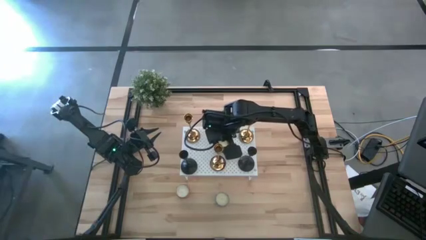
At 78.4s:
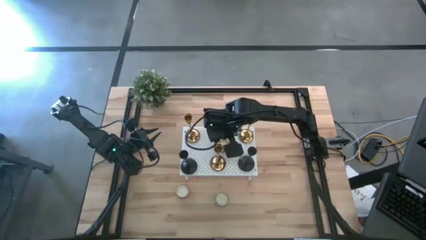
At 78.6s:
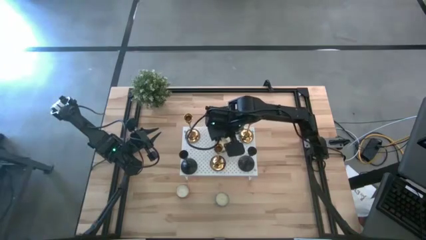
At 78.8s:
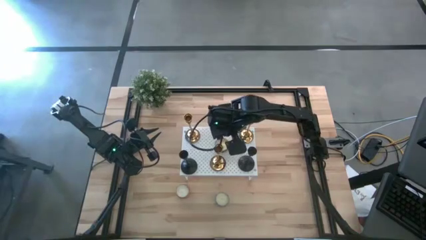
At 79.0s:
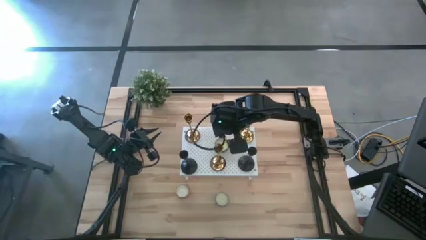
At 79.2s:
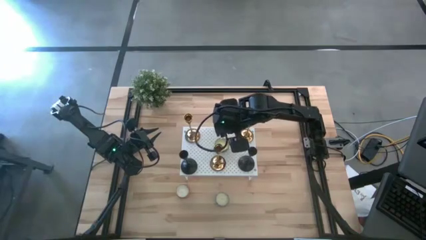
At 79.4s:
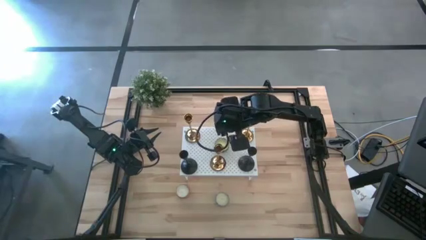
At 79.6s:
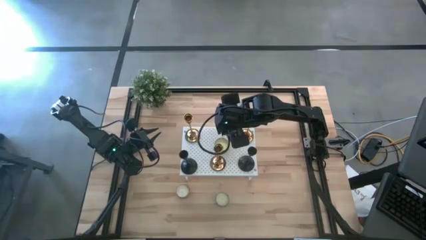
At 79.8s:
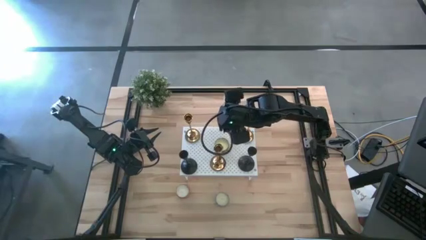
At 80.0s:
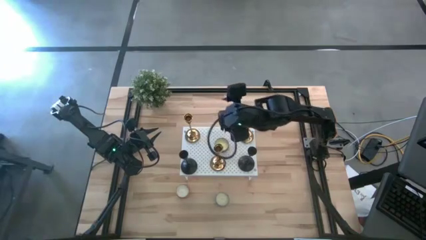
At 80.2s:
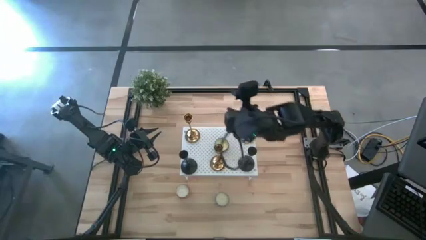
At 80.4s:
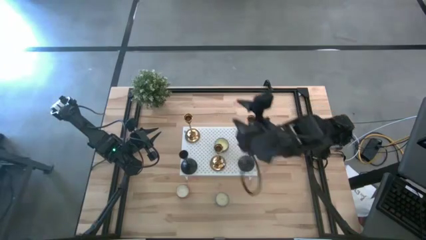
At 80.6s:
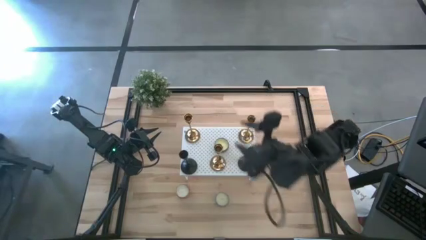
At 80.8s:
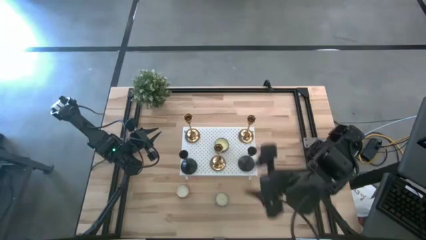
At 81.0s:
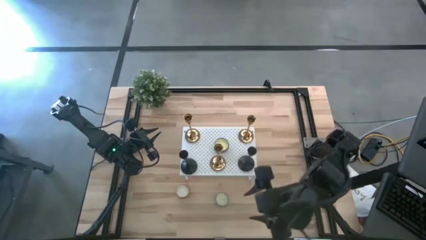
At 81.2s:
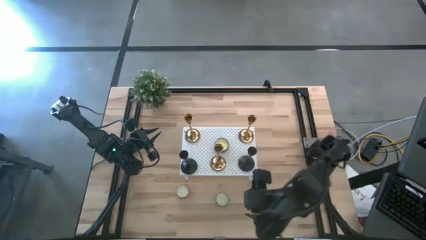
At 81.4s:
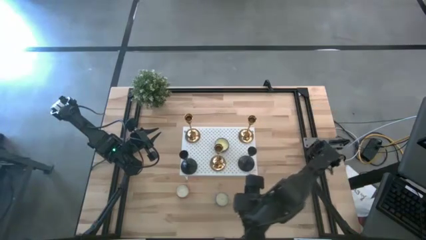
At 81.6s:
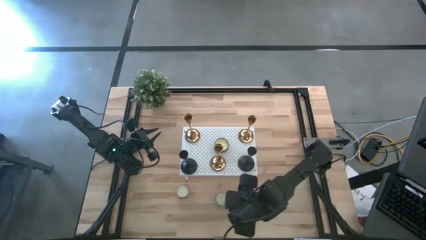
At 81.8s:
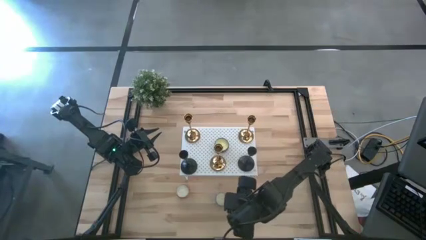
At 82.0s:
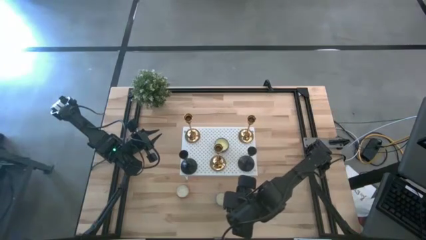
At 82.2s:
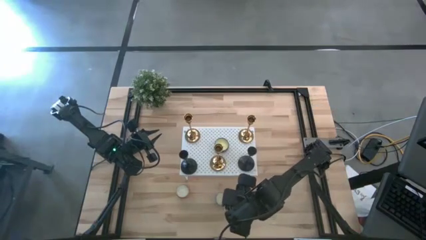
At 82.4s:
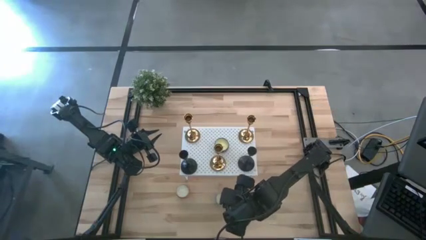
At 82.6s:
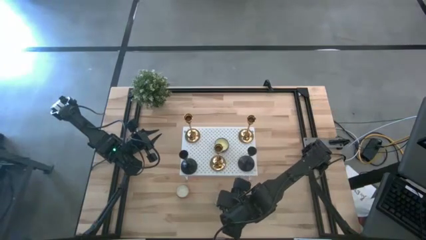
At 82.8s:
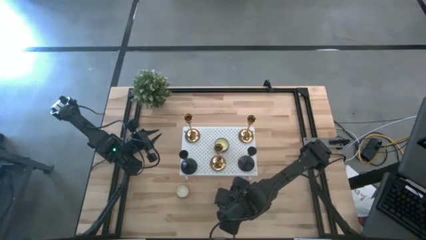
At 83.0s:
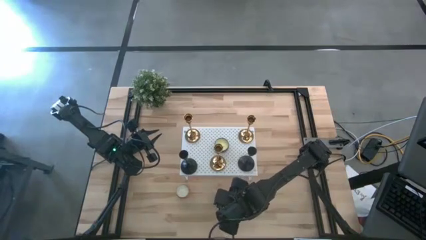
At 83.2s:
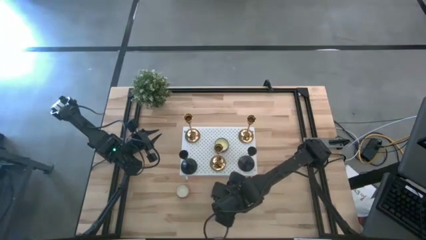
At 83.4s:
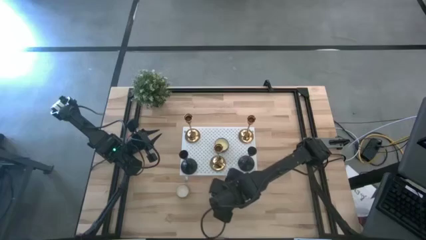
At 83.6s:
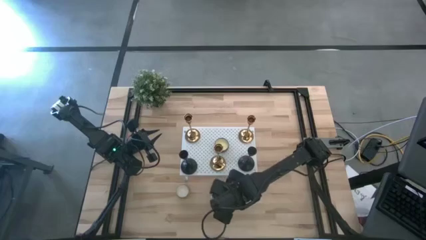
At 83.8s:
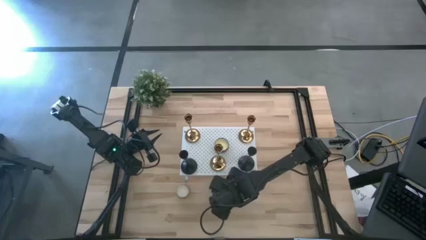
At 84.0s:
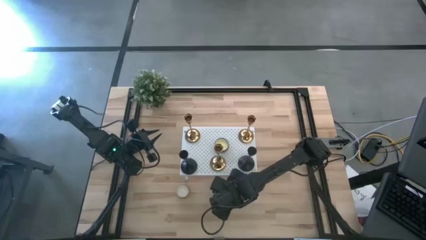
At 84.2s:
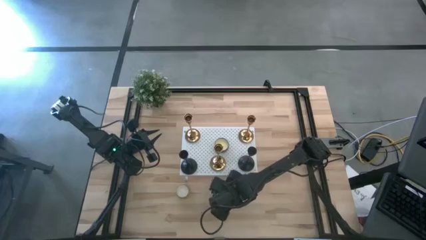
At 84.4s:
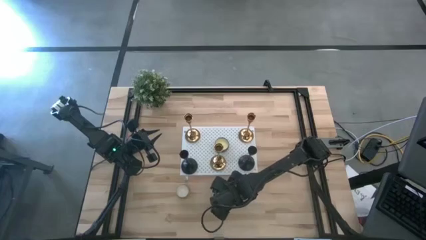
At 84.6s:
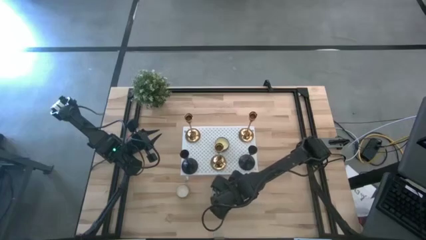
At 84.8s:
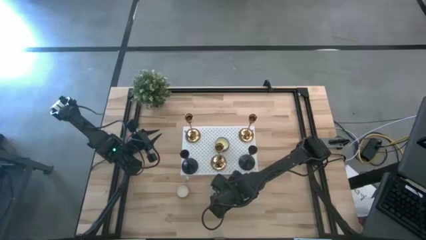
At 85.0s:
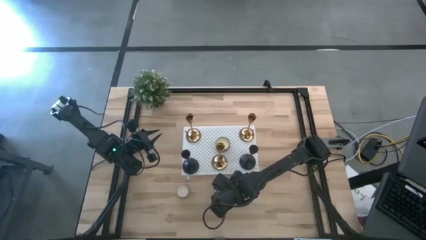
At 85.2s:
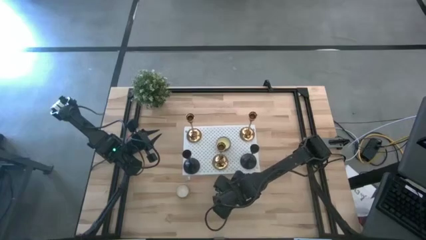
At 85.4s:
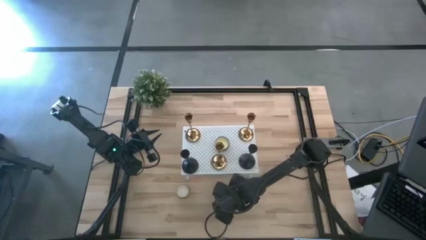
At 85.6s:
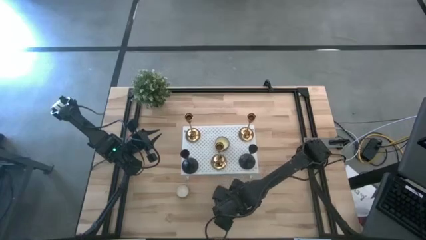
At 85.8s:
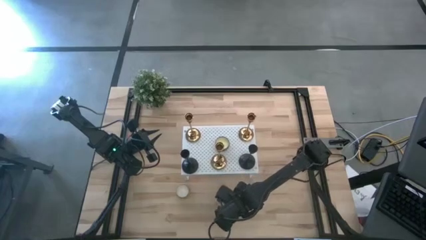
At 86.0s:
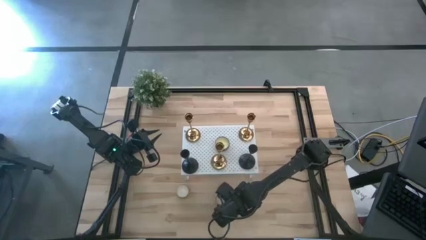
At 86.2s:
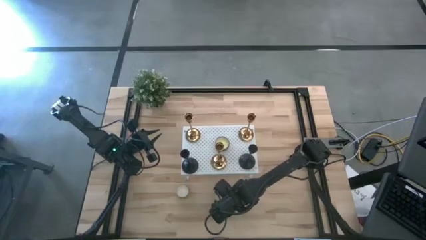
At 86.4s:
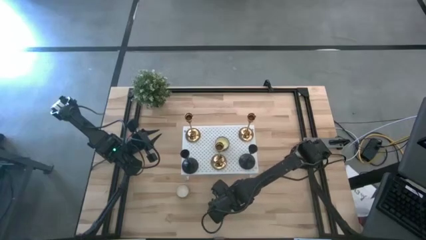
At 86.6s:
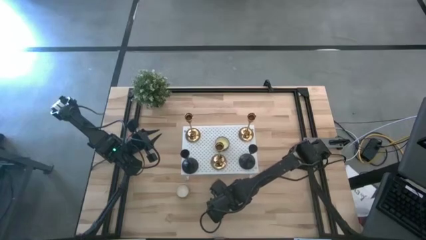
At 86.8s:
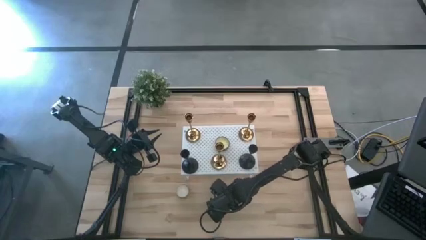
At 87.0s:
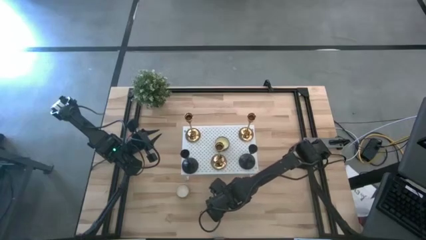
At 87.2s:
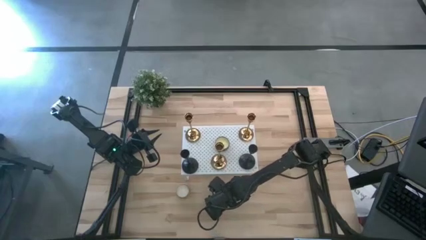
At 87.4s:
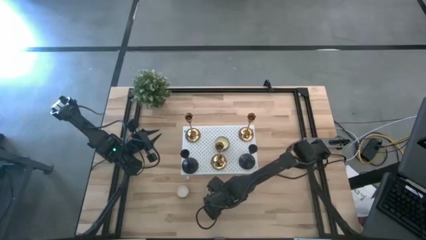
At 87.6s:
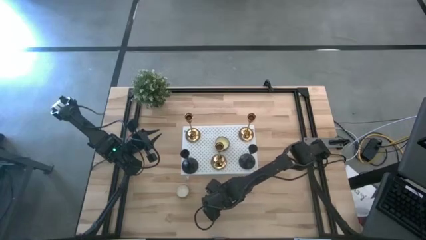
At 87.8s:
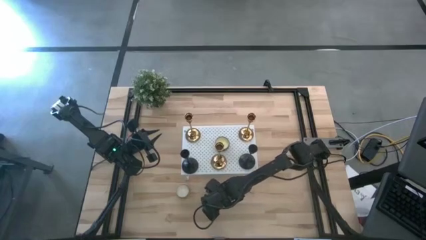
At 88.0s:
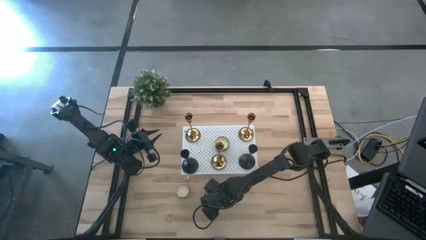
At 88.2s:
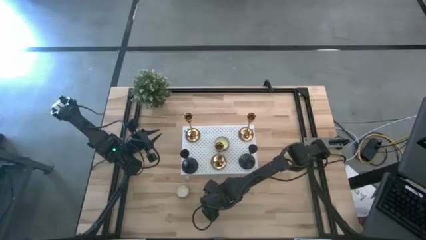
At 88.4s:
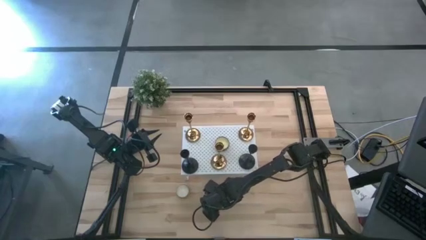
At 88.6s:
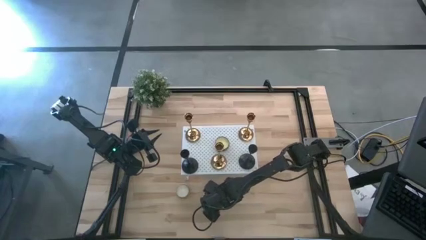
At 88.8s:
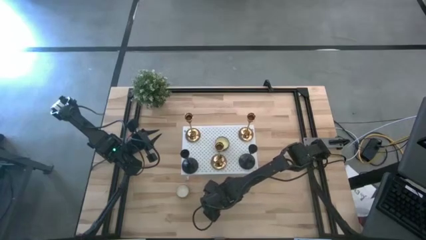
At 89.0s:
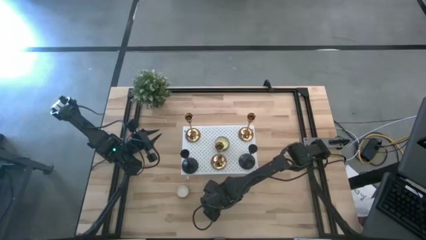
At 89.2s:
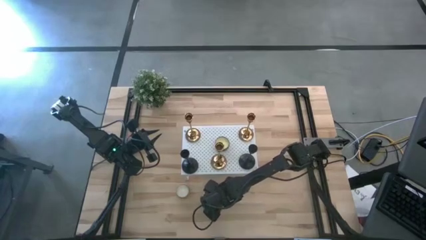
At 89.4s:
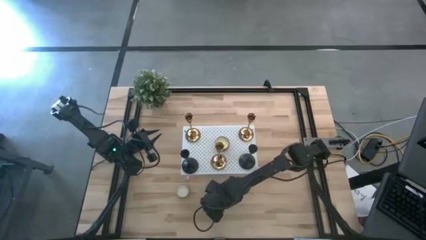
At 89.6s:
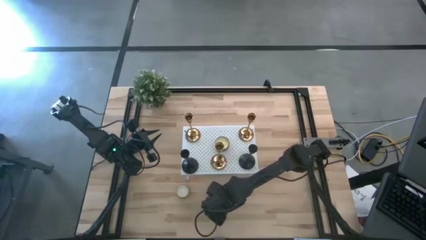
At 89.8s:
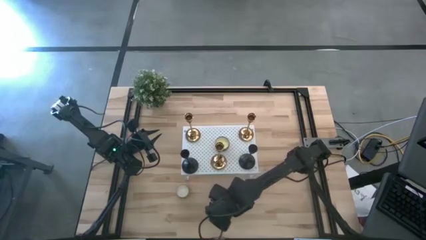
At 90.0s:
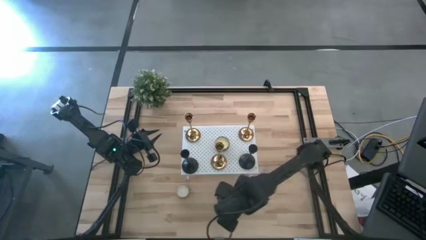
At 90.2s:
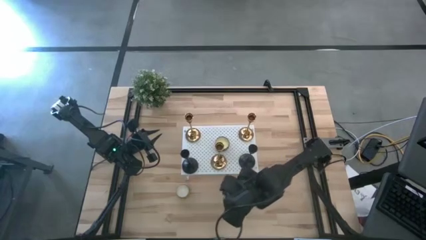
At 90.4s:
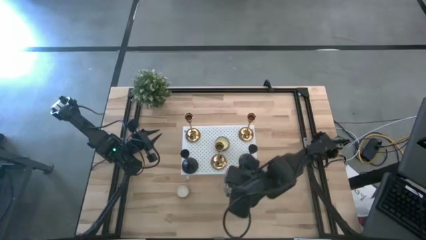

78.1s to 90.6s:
Task: Pick & Place candle stick holders
Put the middle scented candle on the shelf

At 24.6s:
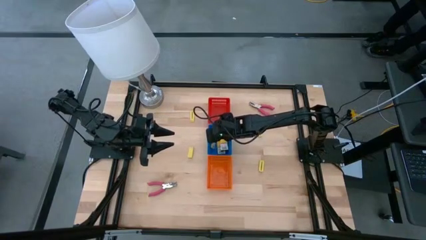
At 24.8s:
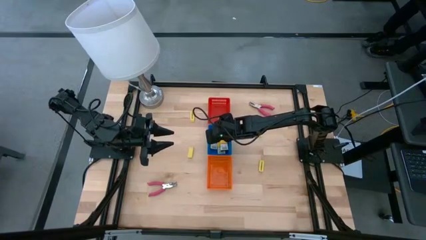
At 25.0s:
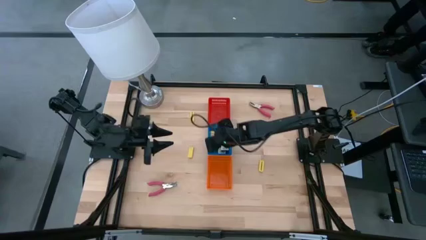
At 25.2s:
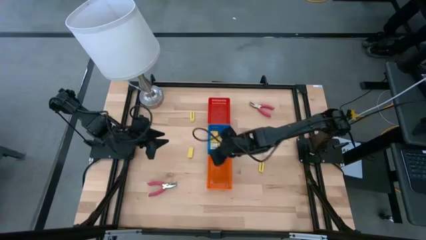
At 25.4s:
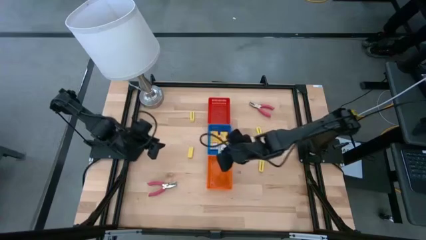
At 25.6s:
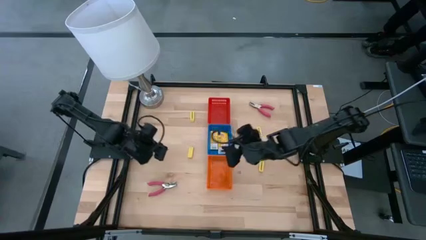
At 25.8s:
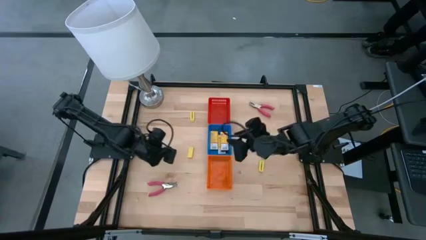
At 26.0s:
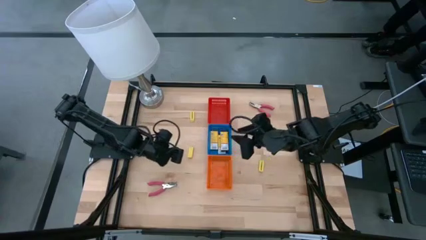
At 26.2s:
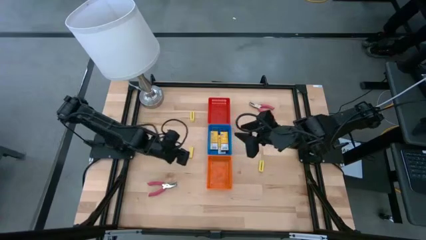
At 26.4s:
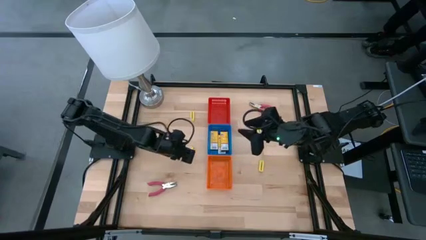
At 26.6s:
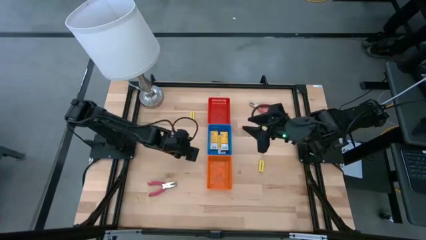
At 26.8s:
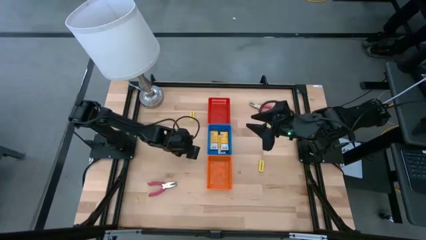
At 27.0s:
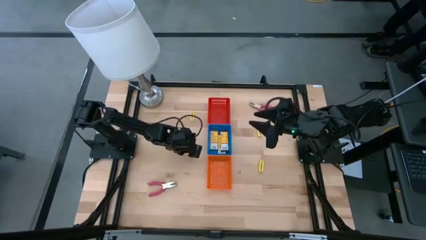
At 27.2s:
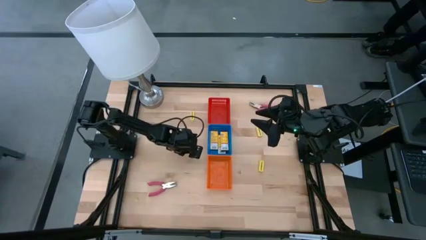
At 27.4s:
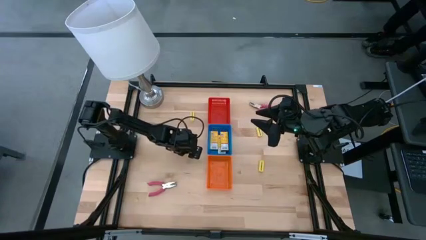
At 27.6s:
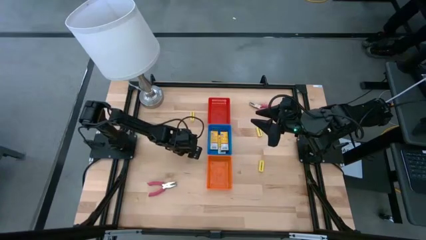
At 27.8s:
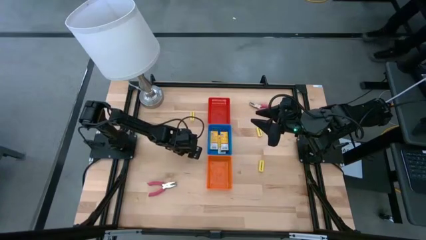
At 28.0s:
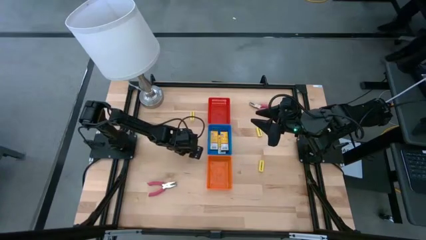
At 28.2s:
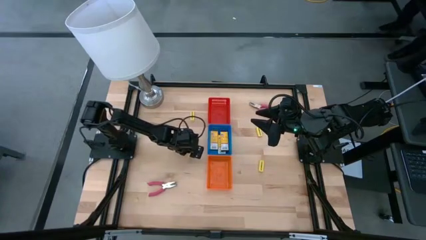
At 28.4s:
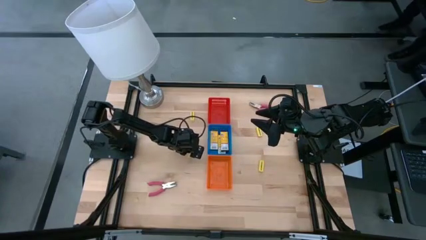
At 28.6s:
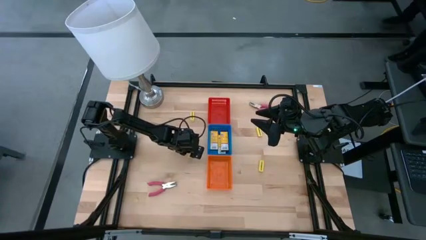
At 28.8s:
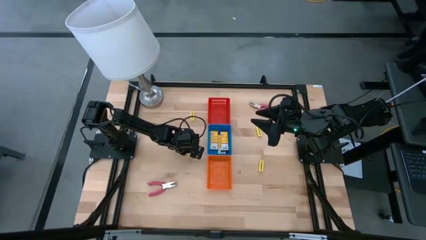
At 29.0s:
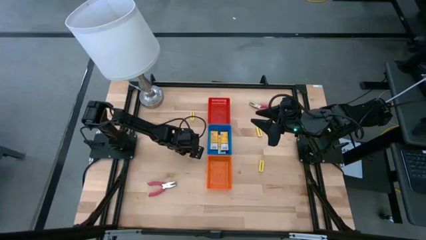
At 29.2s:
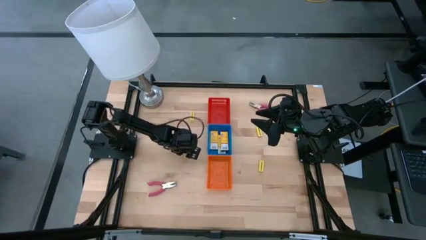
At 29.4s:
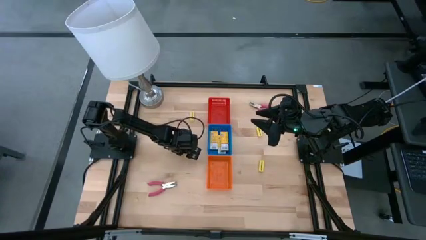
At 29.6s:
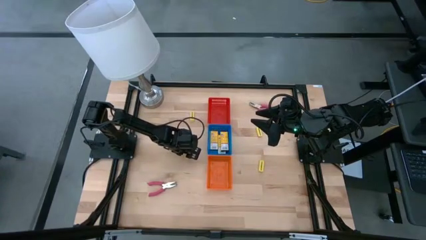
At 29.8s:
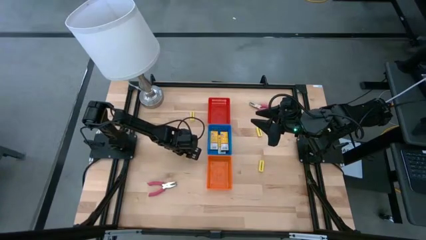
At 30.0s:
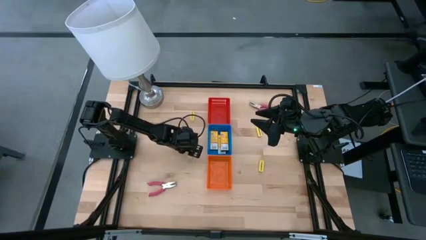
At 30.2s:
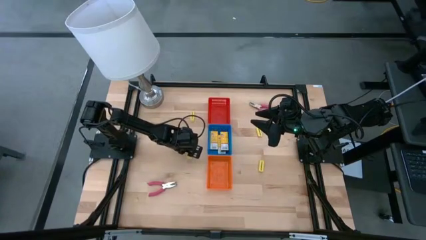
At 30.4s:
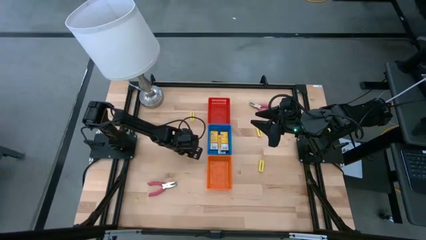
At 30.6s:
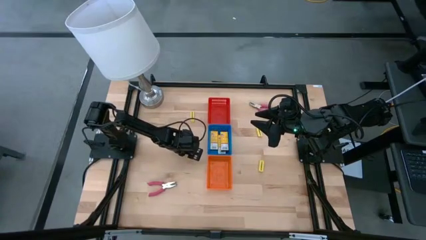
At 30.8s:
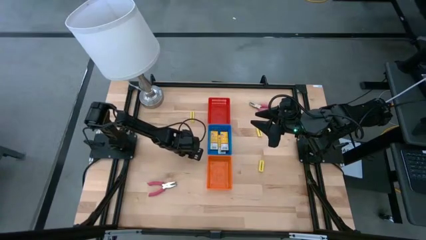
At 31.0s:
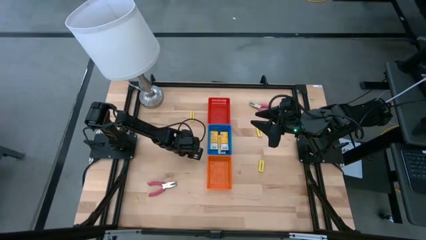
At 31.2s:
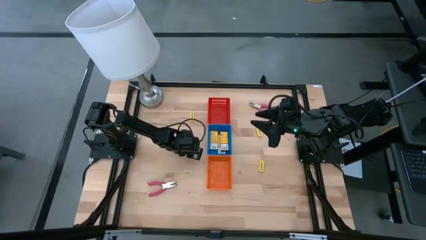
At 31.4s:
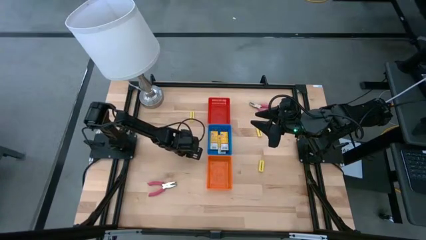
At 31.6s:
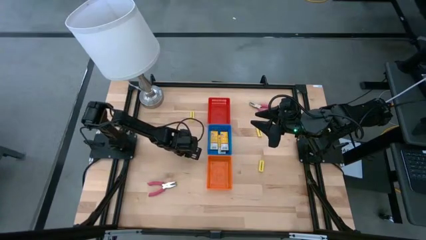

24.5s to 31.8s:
Task: Pick & Place School Supplies
Put the yellow eraser into the orange bin
